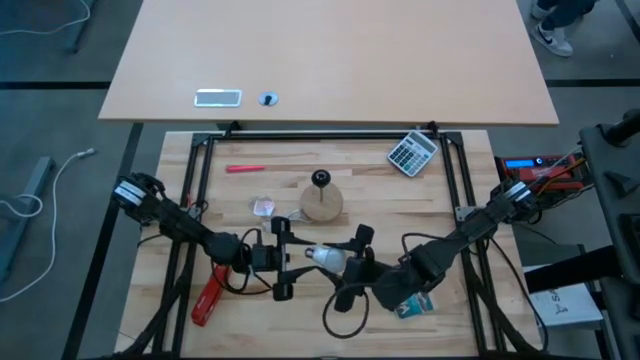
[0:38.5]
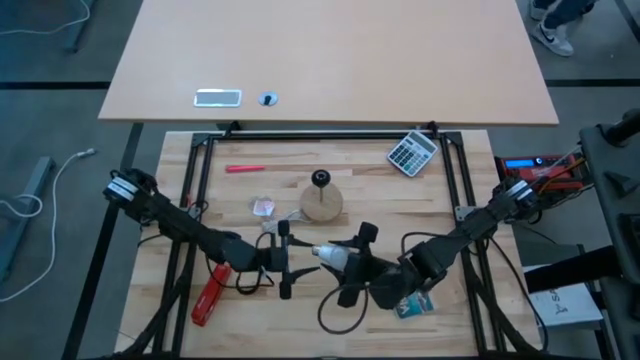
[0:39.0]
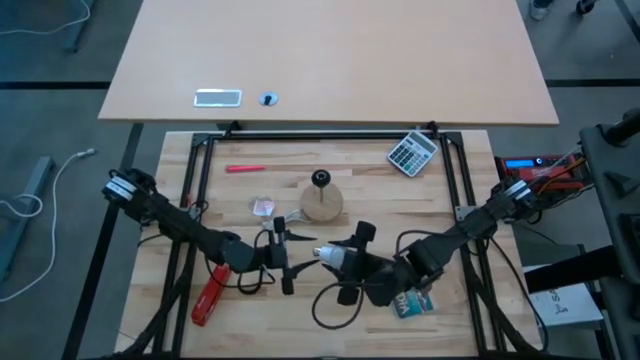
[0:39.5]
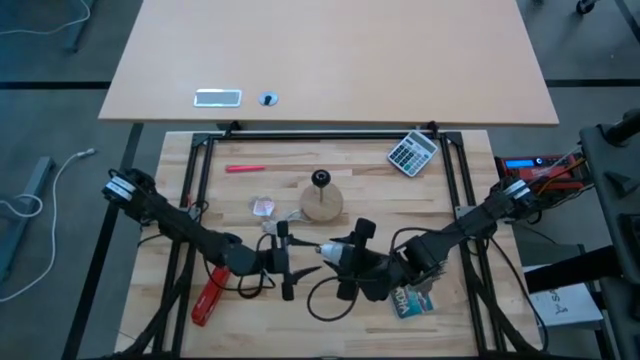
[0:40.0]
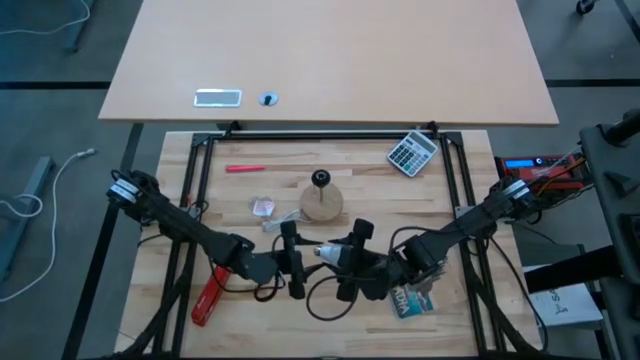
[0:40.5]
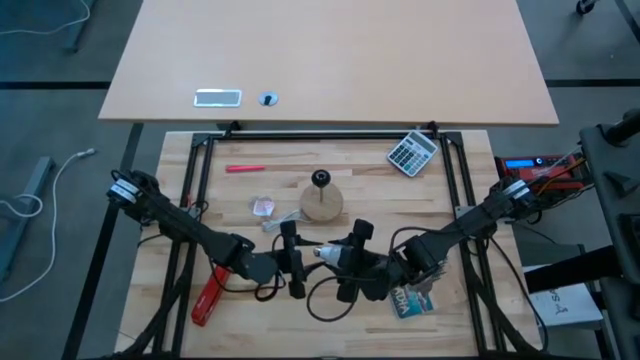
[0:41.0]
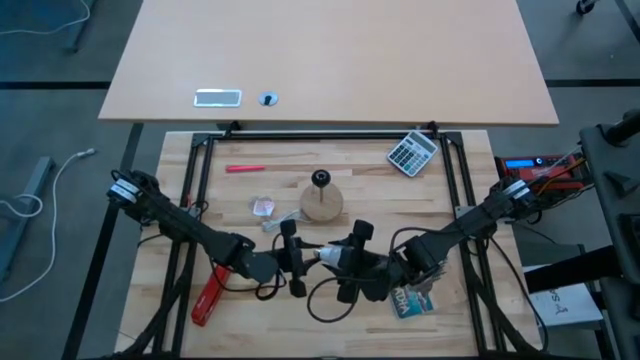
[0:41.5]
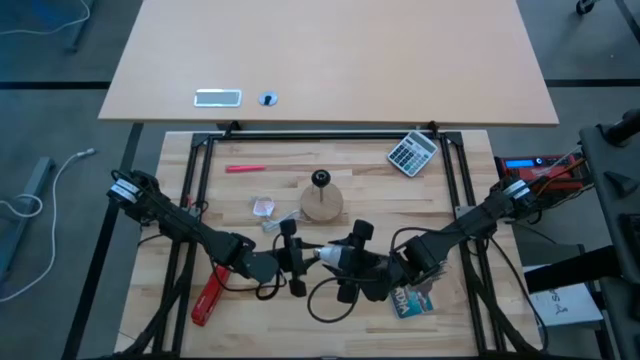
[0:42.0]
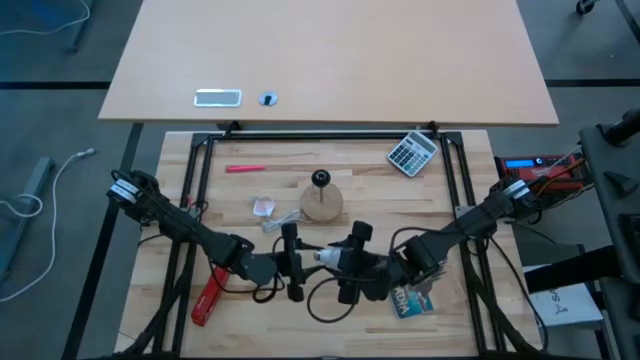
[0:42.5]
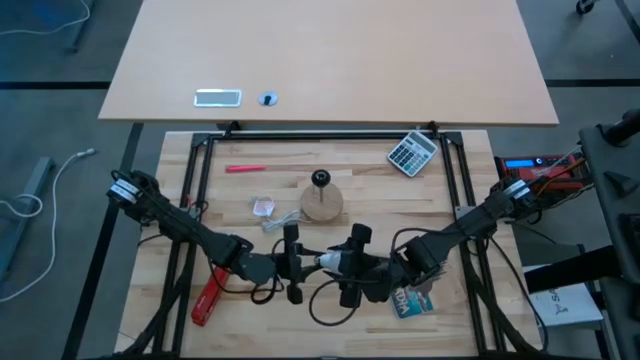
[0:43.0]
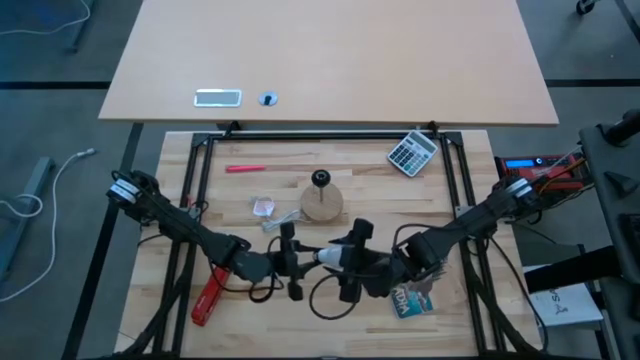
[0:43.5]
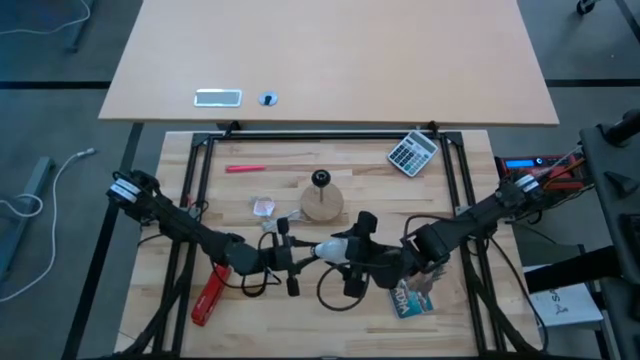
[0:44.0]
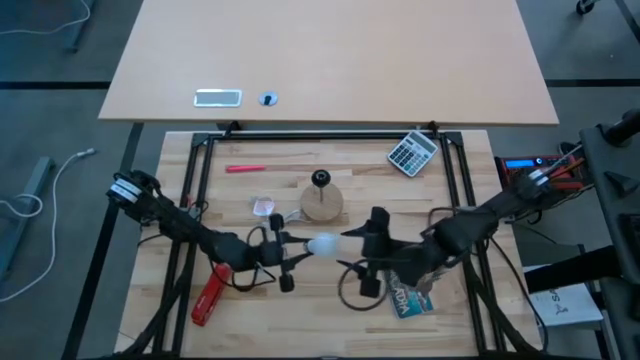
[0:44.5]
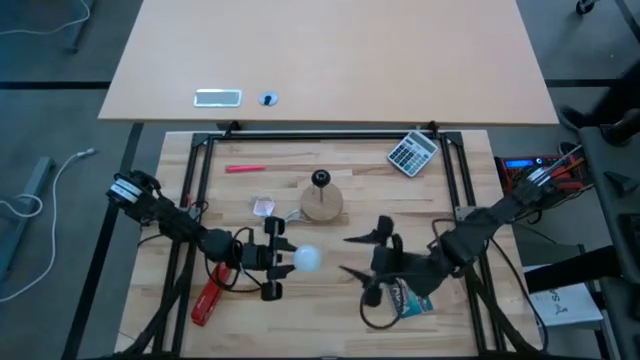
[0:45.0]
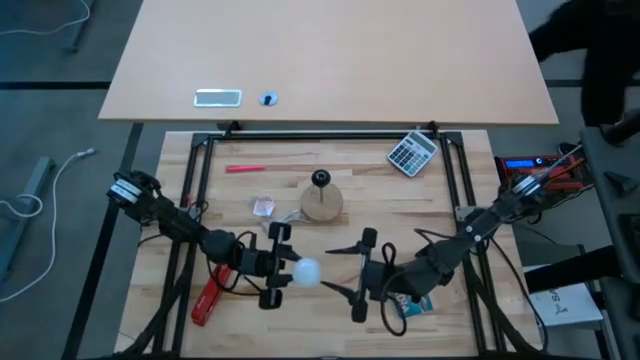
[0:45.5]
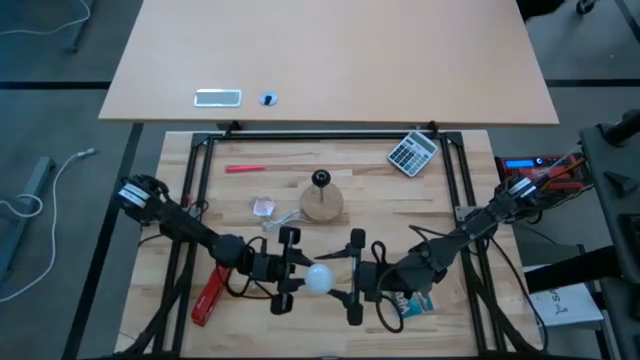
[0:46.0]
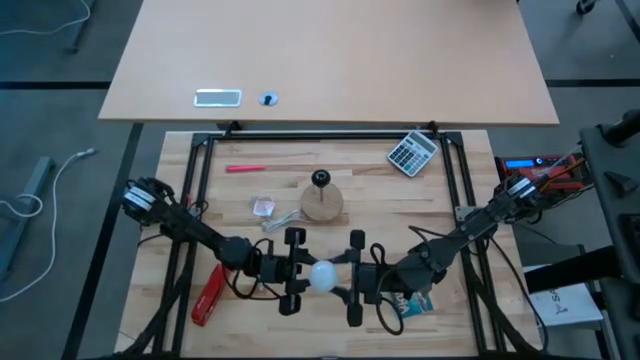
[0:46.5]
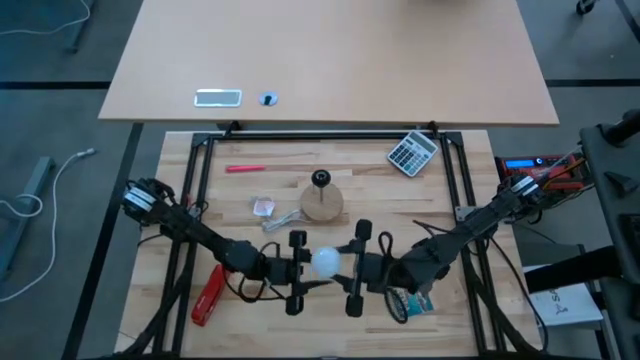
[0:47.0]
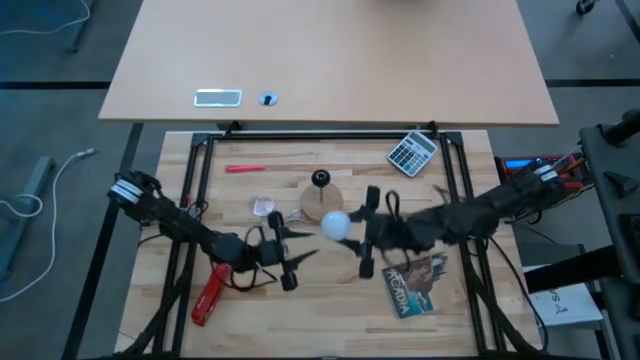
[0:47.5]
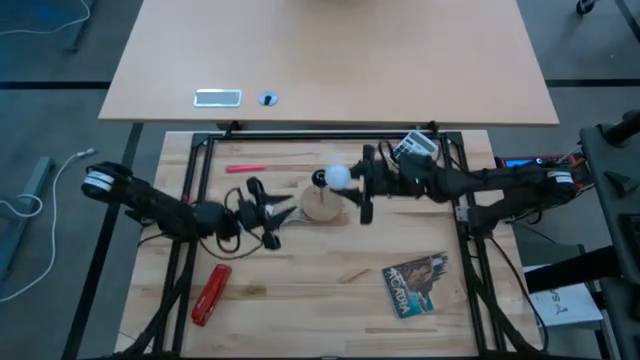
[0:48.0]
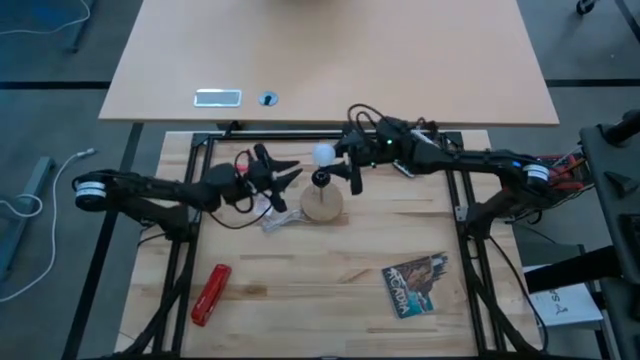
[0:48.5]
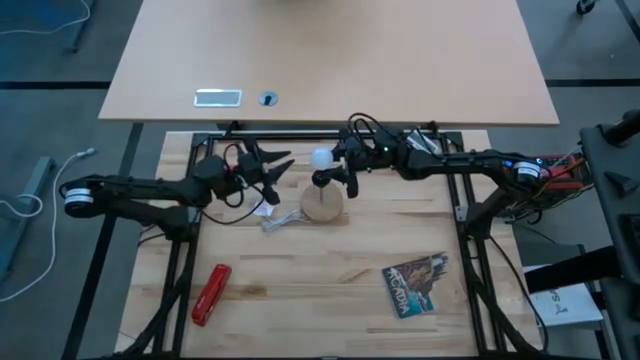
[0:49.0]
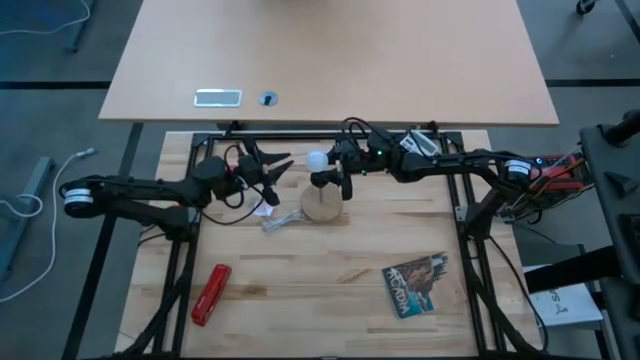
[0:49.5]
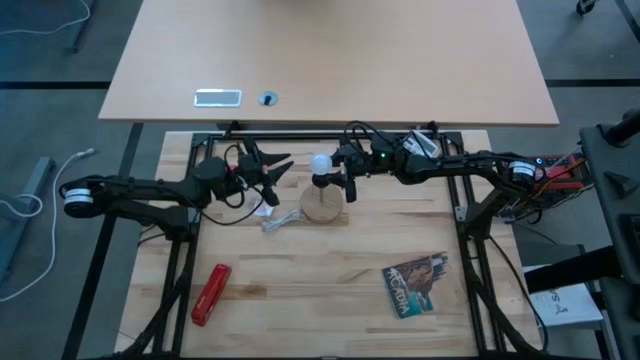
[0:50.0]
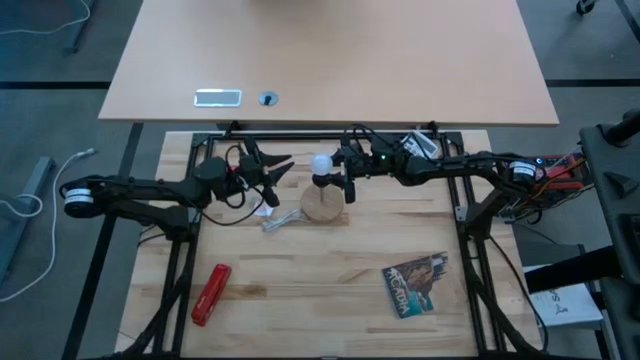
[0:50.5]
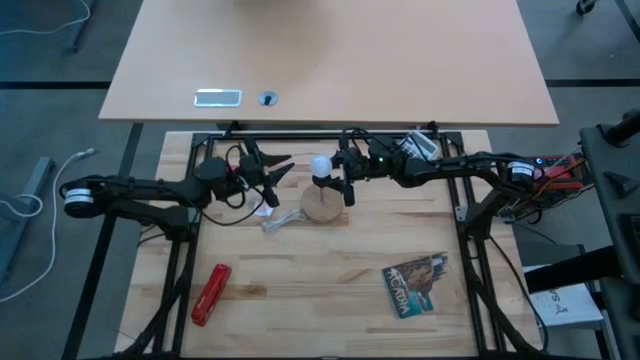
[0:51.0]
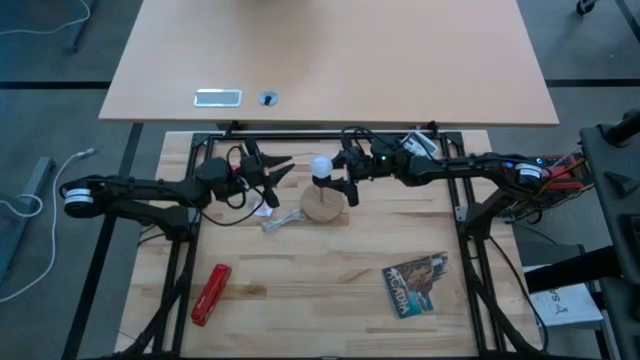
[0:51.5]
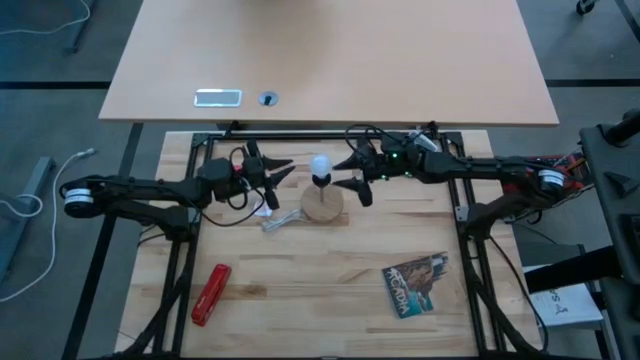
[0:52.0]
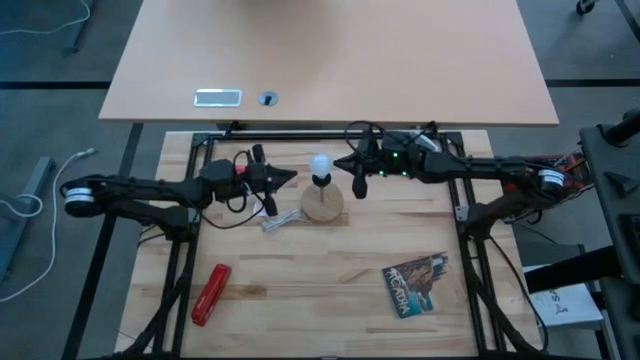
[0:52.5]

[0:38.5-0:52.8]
Task: Screw lightbulb
Insert the lightbulb into the lamp
